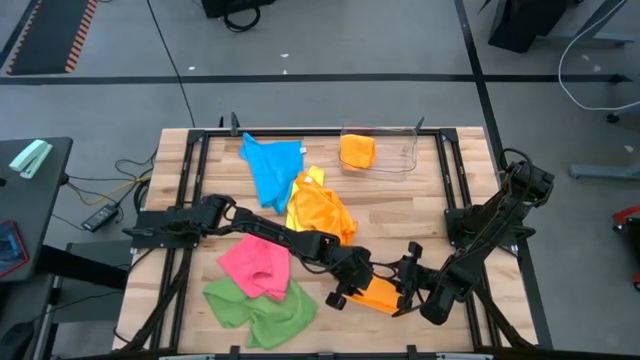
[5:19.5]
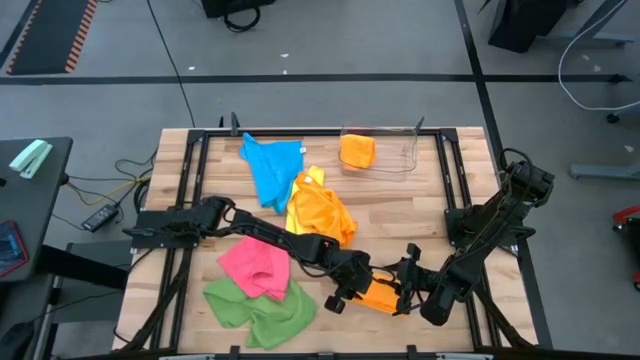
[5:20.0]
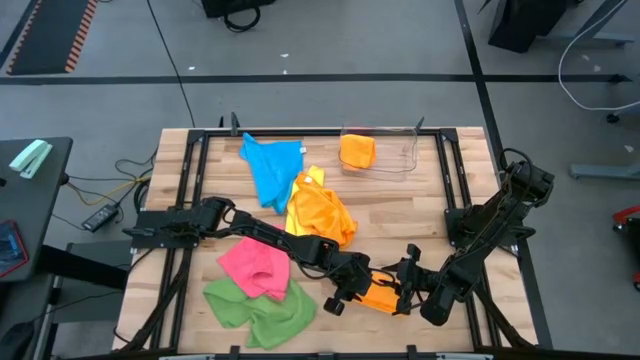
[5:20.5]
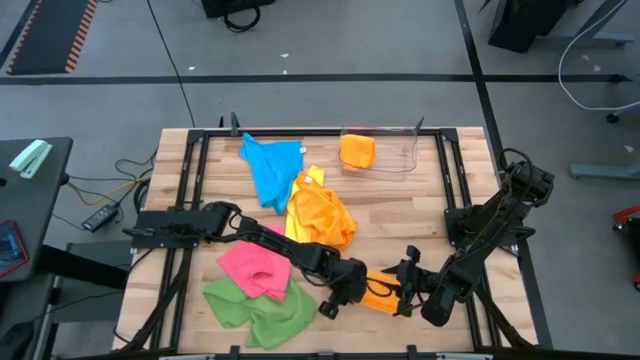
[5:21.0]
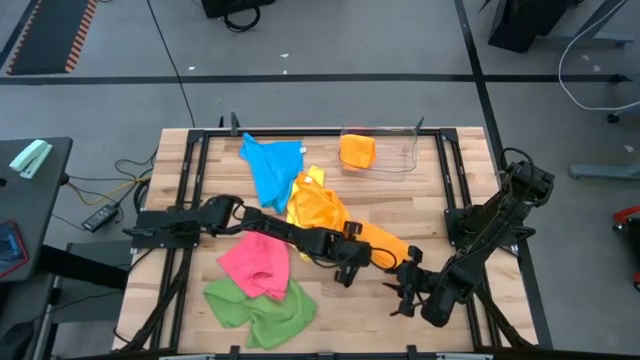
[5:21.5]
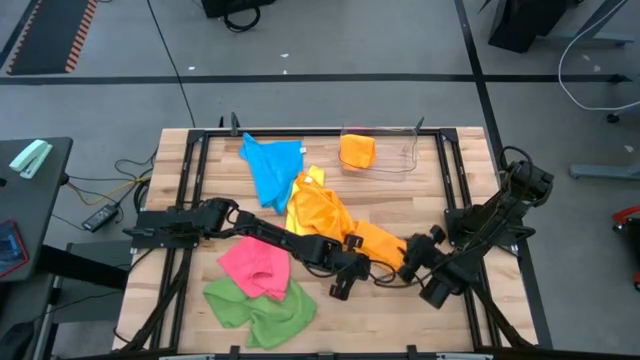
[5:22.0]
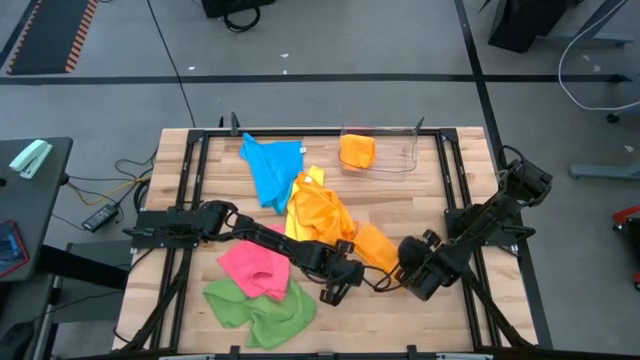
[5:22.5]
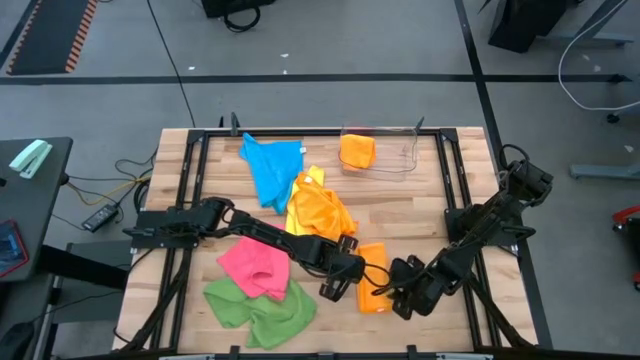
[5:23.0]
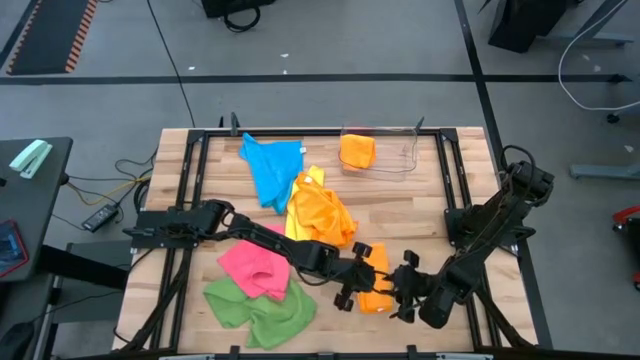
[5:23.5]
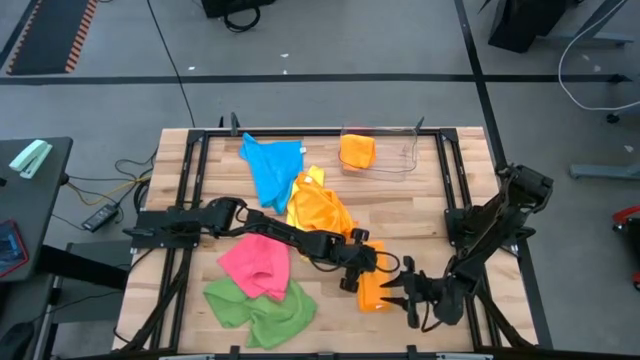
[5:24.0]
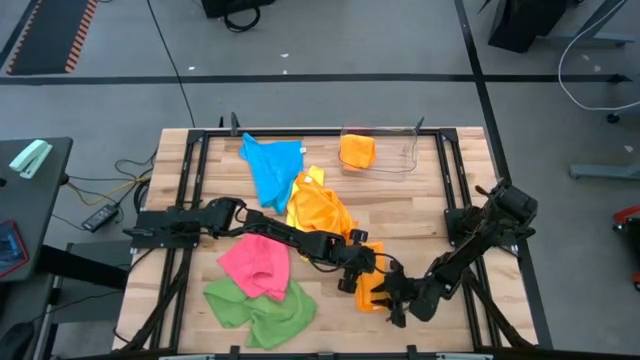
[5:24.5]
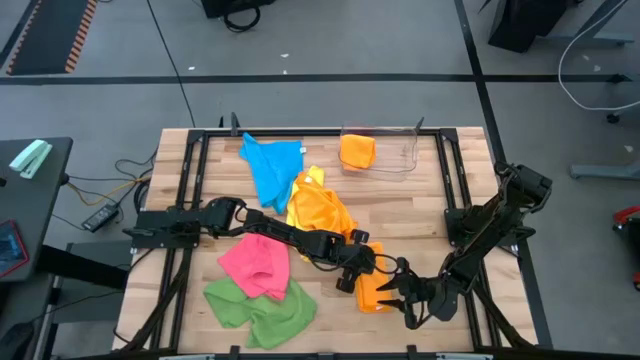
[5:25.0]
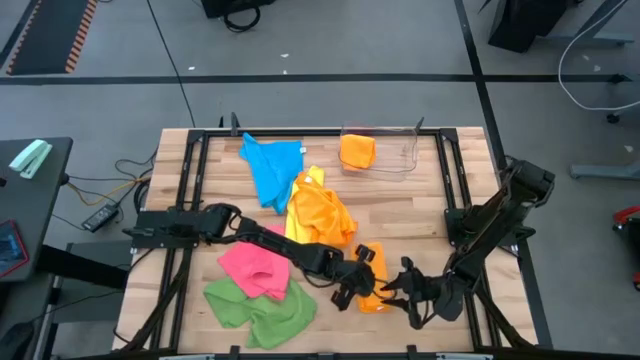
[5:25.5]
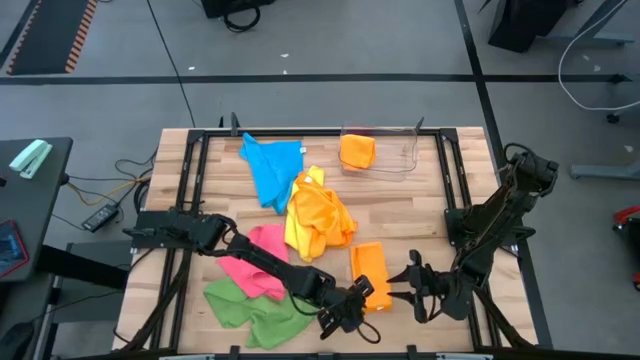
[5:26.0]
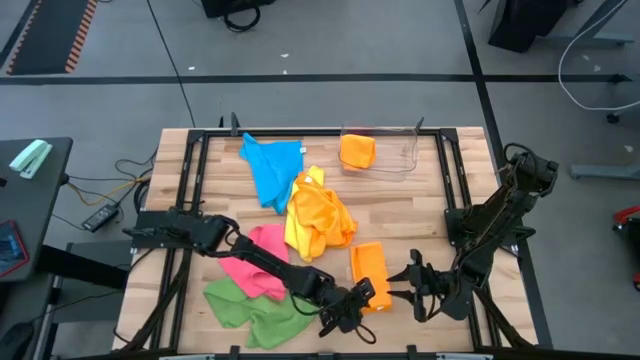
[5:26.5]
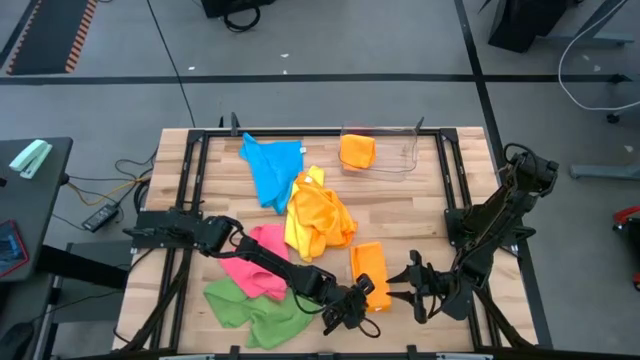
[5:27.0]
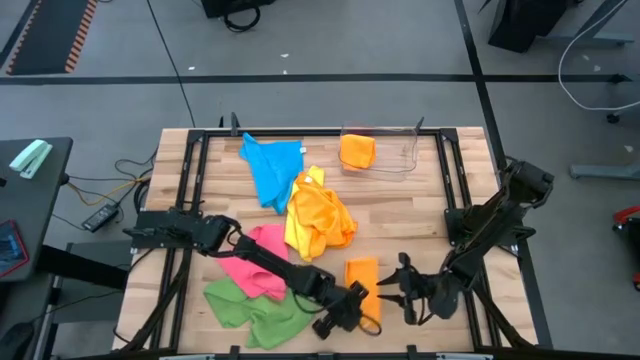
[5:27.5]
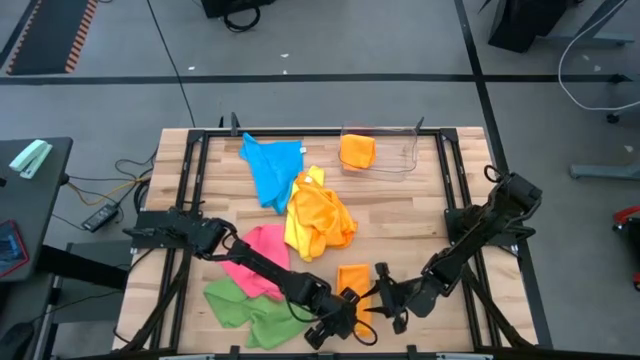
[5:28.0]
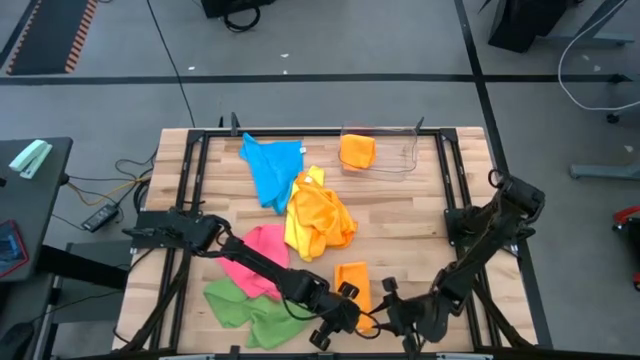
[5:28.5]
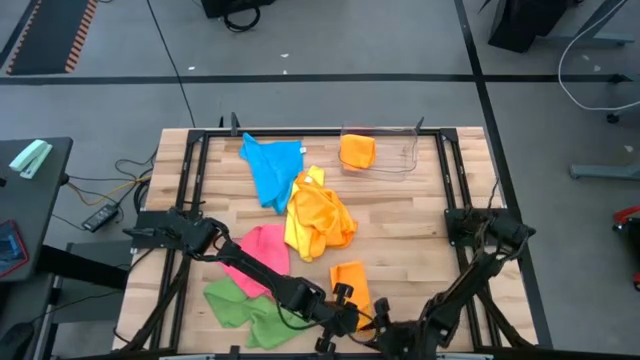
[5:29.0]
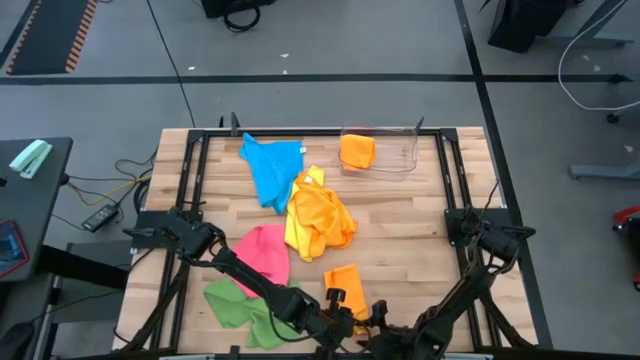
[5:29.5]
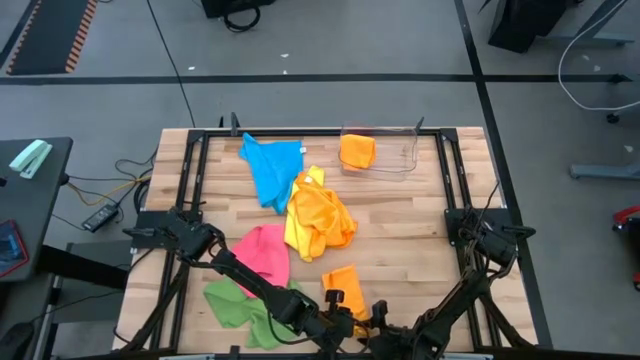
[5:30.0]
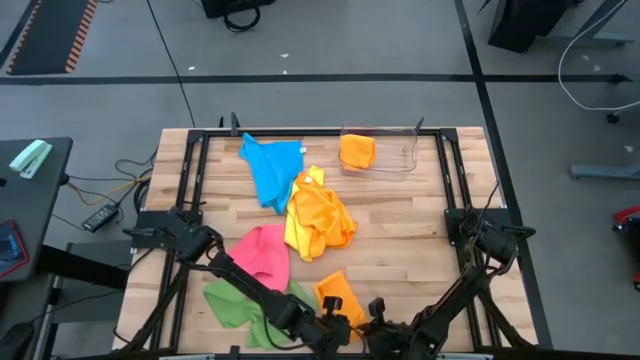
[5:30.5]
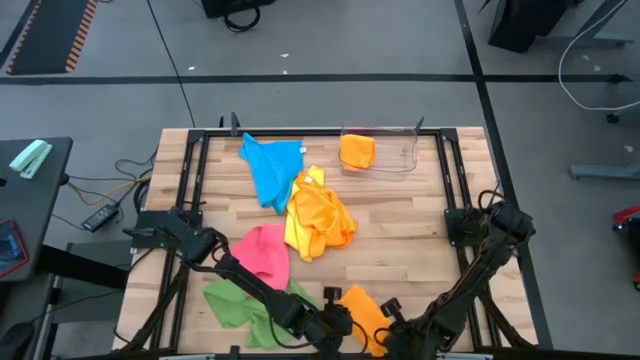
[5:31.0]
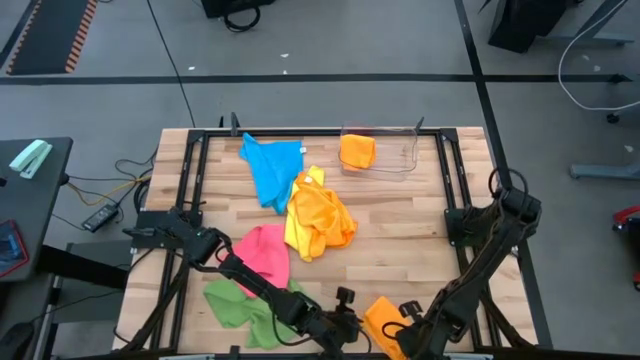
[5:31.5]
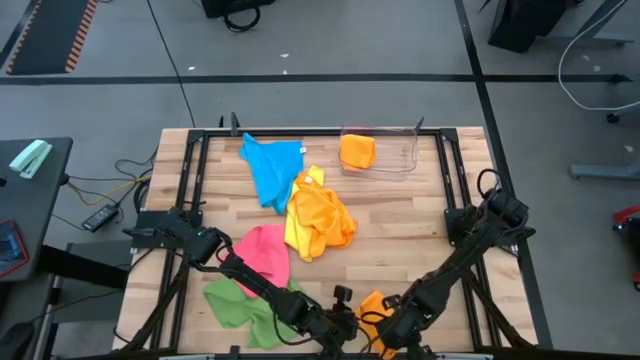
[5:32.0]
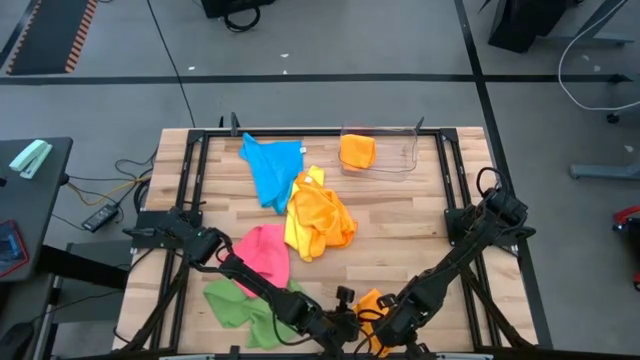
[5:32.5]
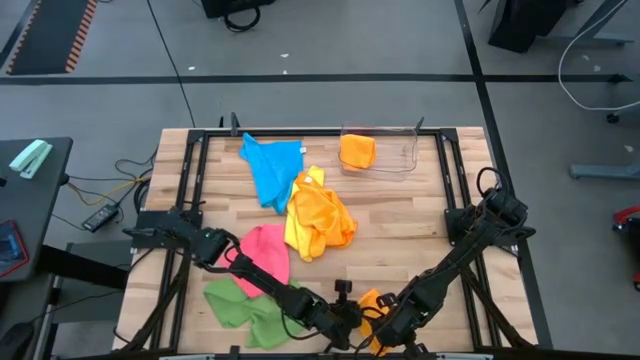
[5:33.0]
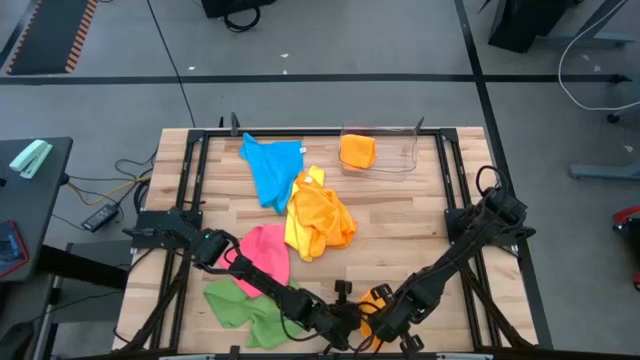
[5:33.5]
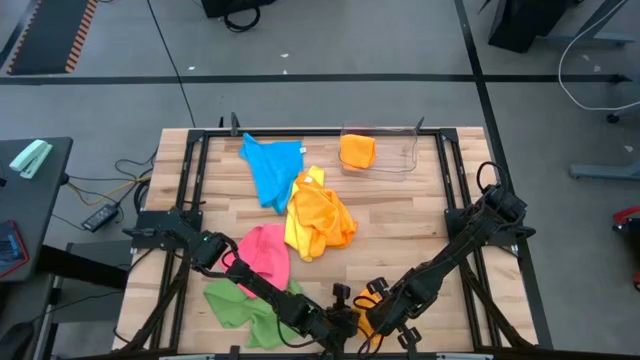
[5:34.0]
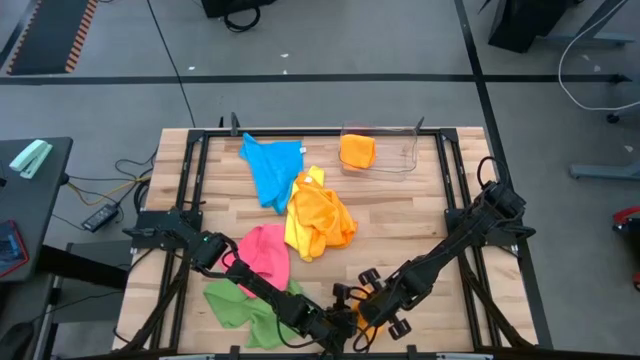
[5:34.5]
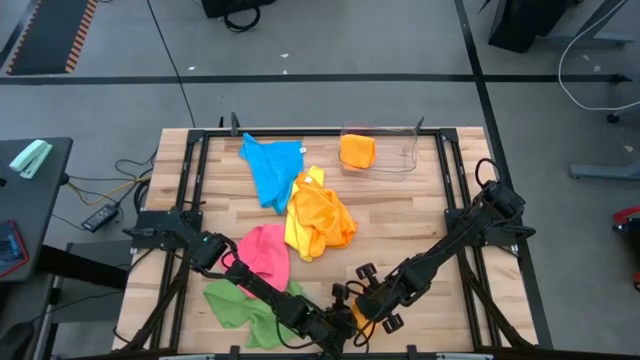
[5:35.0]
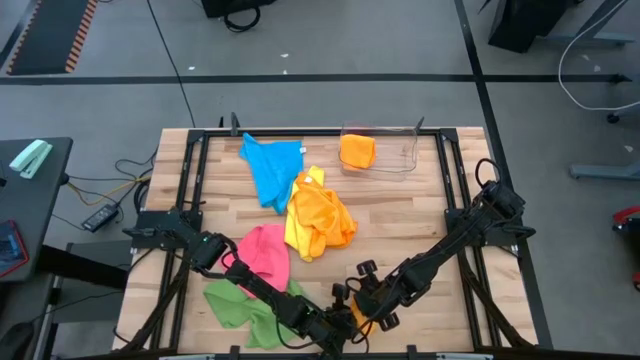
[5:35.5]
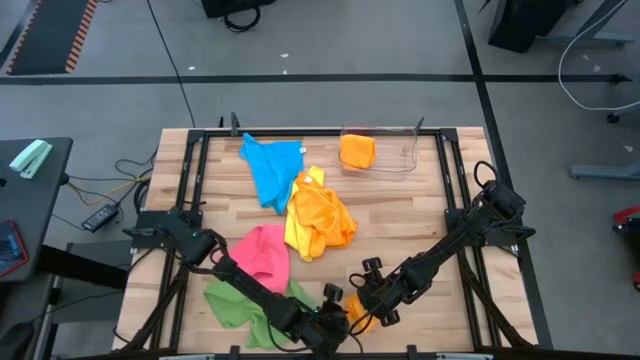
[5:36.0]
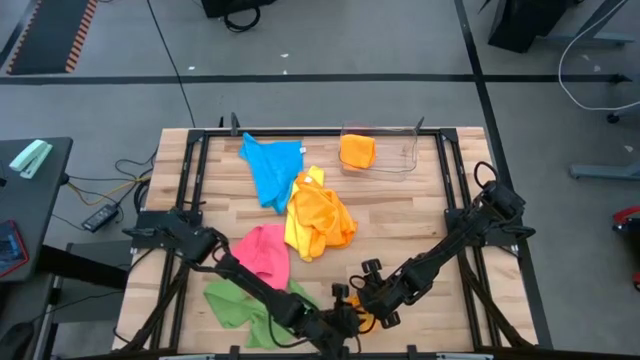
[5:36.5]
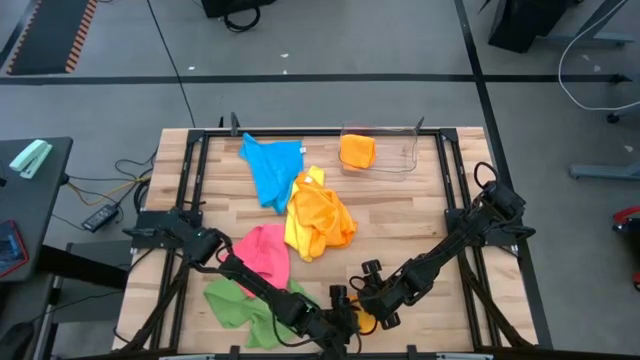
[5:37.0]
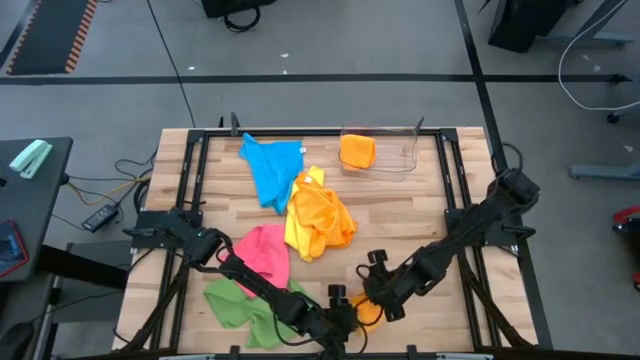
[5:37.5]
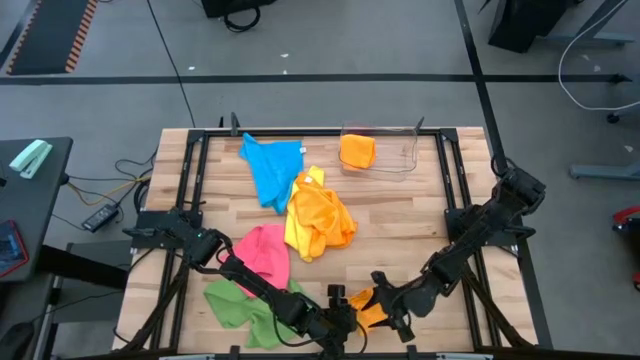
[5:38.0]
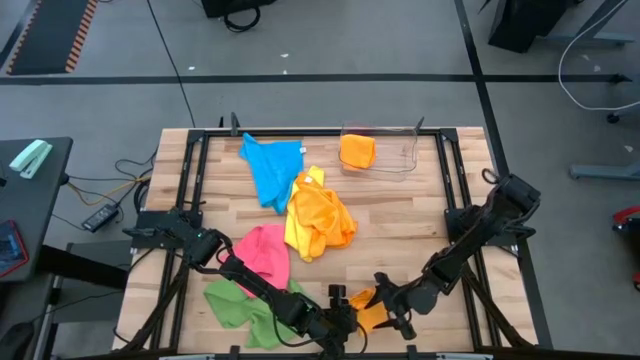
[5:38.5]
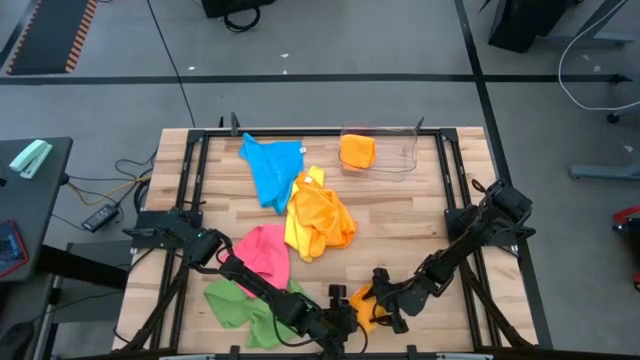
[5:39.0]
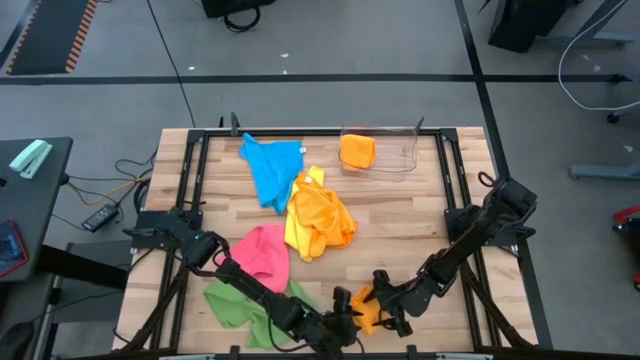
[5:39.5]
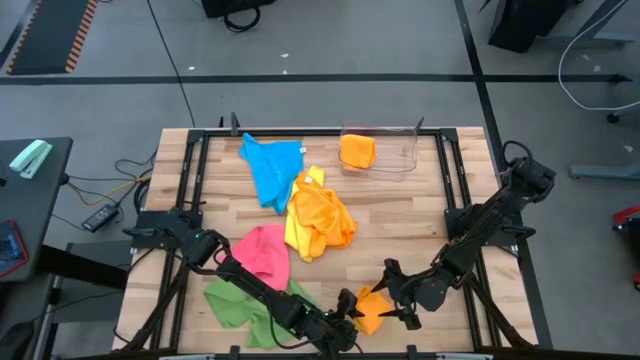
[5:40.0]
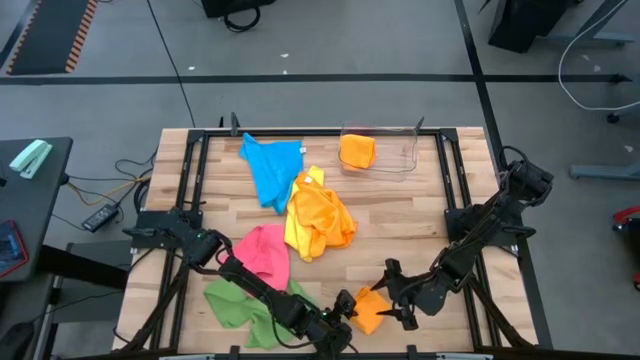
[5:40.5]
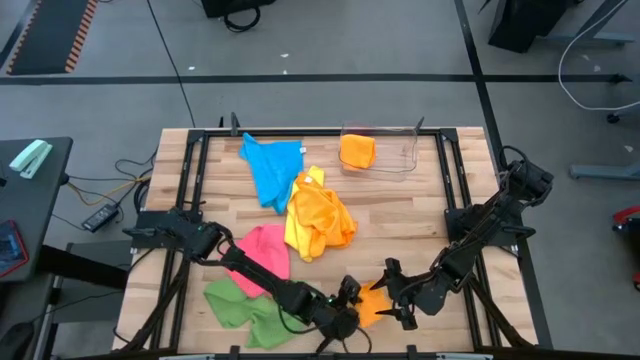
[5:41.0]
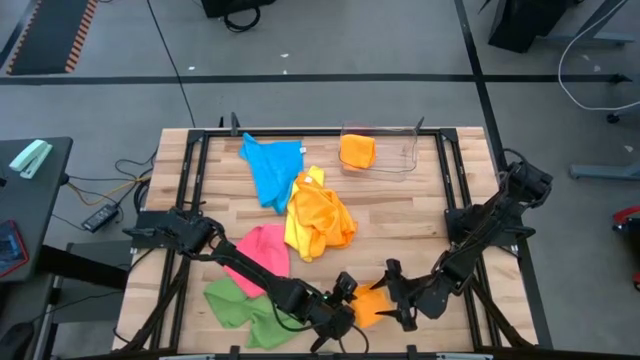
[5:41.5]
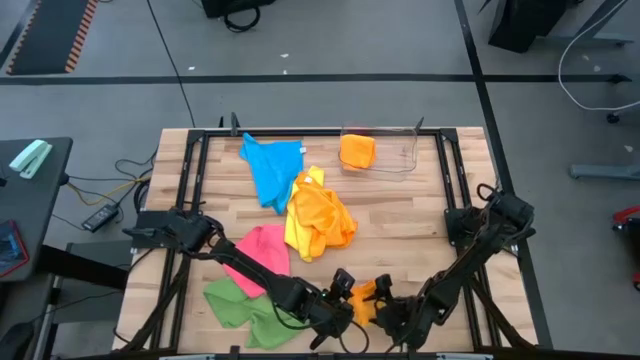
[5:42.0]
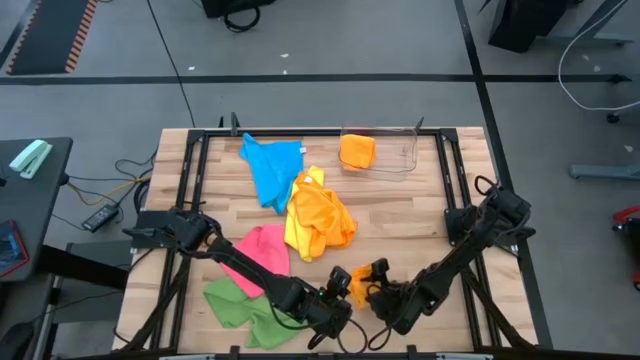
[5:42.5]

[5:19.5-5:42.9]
Task: Fold microfiber towels
Fold the right orange microfiber cloth
